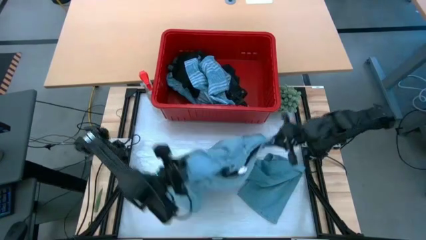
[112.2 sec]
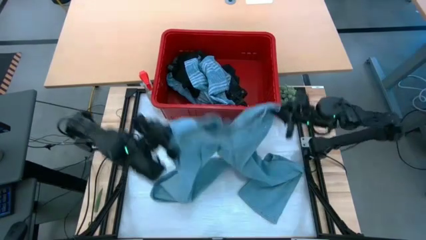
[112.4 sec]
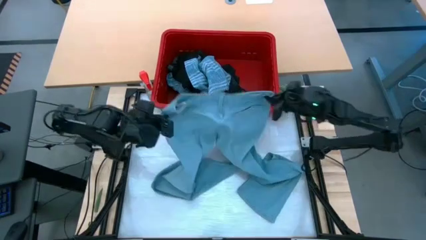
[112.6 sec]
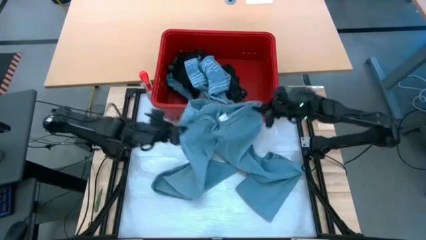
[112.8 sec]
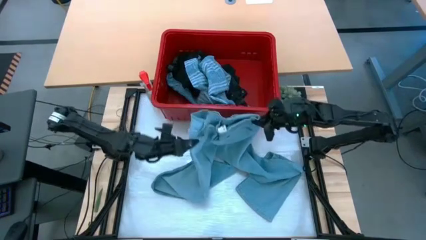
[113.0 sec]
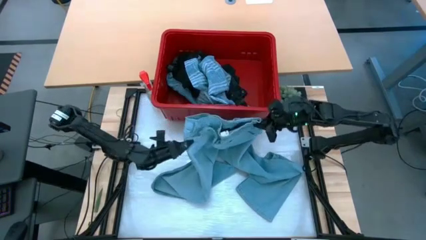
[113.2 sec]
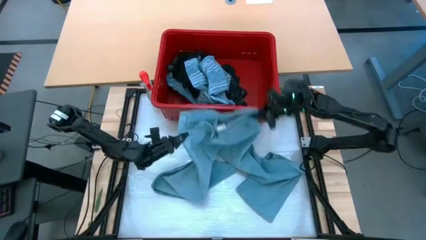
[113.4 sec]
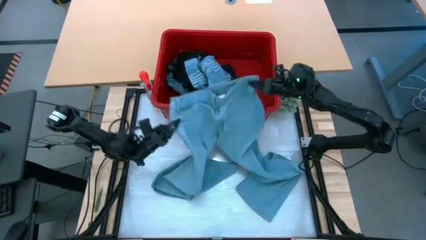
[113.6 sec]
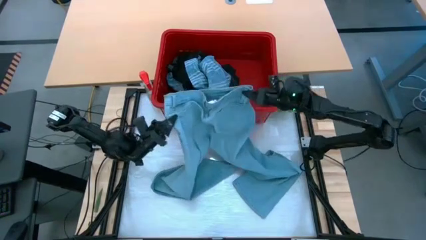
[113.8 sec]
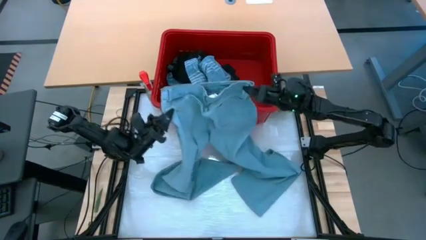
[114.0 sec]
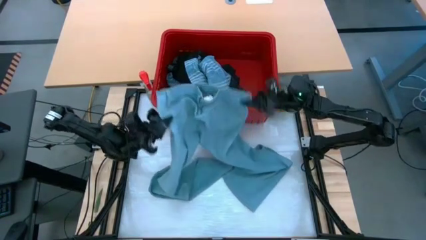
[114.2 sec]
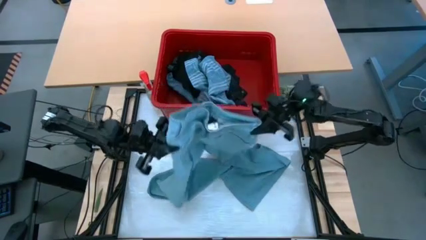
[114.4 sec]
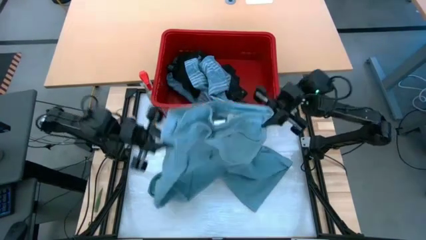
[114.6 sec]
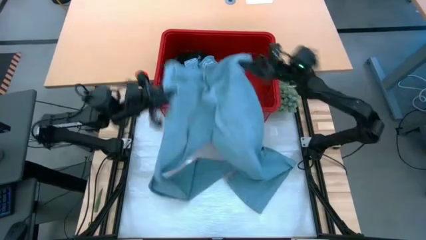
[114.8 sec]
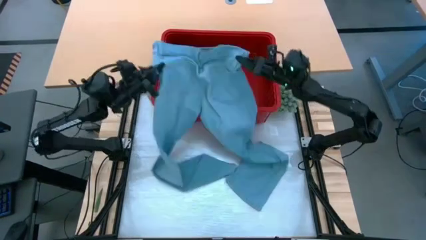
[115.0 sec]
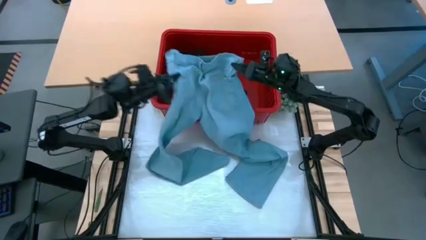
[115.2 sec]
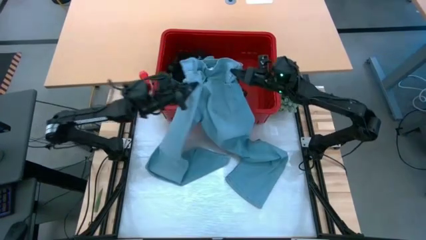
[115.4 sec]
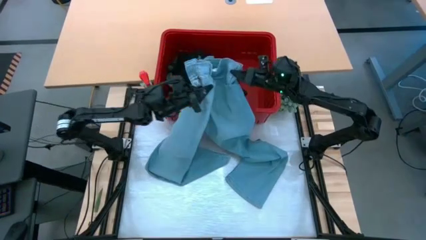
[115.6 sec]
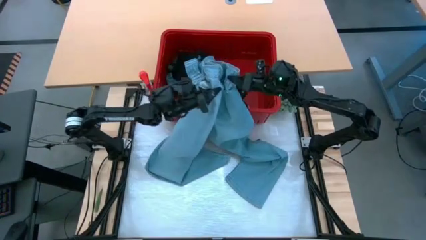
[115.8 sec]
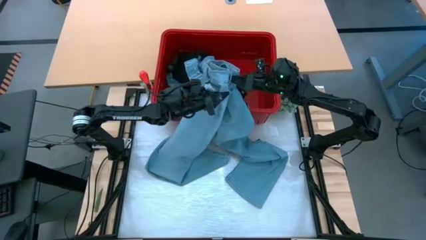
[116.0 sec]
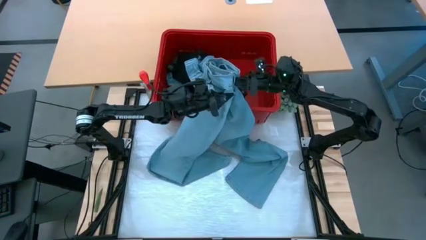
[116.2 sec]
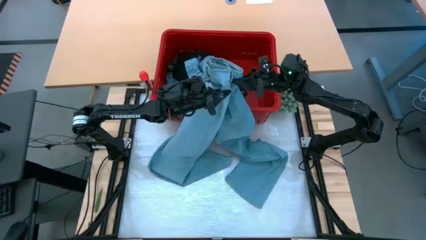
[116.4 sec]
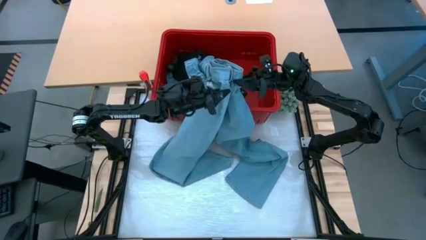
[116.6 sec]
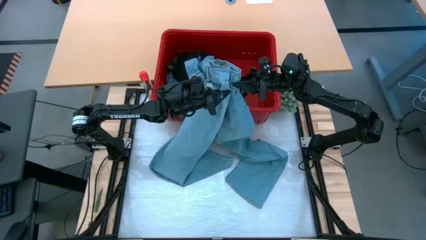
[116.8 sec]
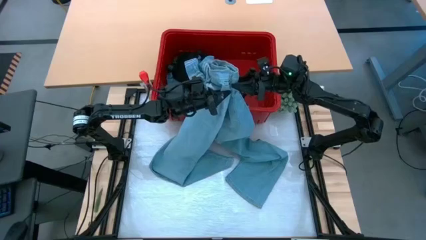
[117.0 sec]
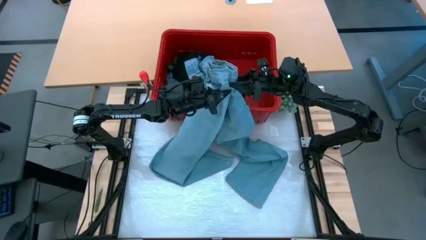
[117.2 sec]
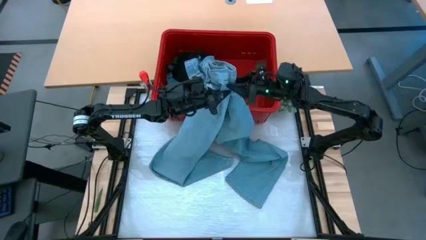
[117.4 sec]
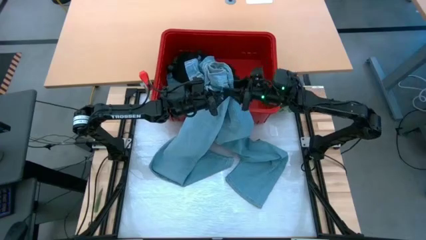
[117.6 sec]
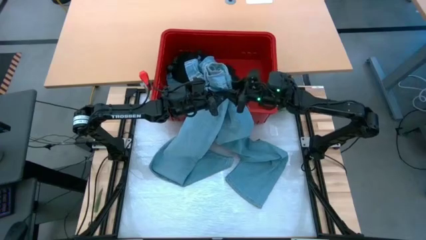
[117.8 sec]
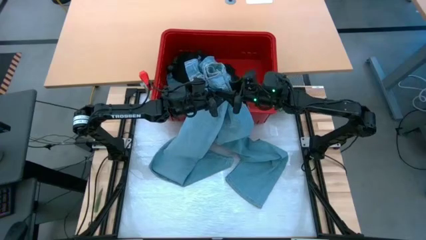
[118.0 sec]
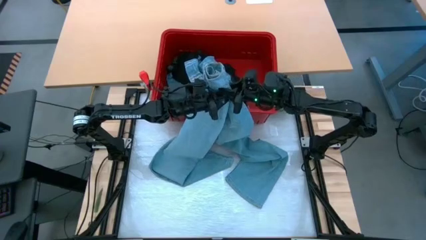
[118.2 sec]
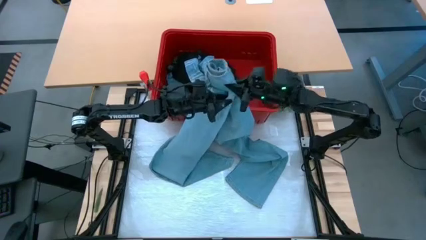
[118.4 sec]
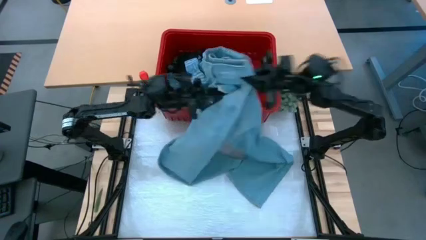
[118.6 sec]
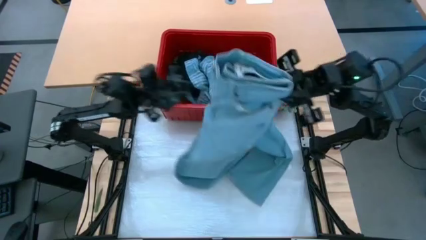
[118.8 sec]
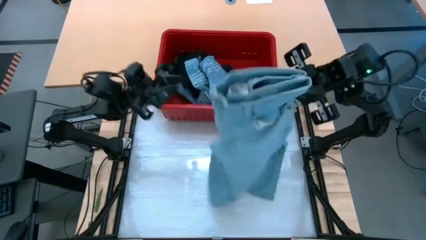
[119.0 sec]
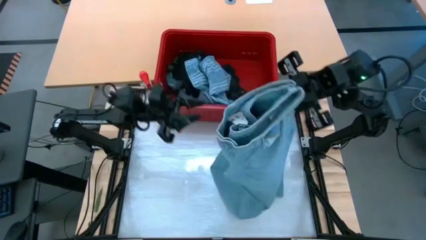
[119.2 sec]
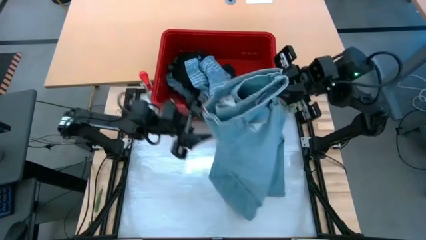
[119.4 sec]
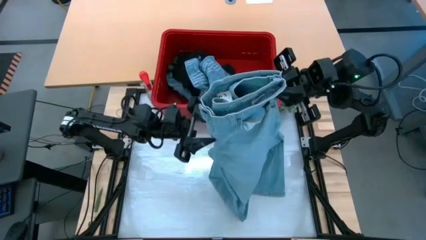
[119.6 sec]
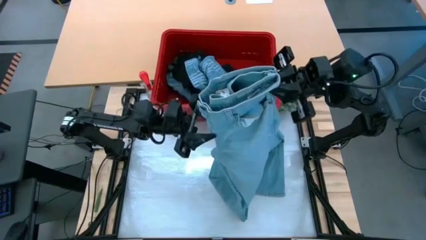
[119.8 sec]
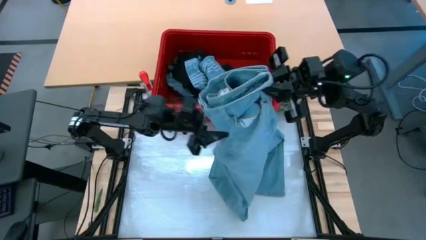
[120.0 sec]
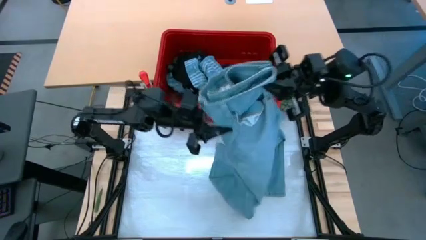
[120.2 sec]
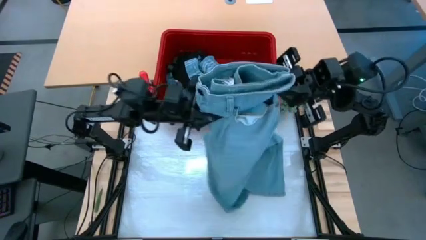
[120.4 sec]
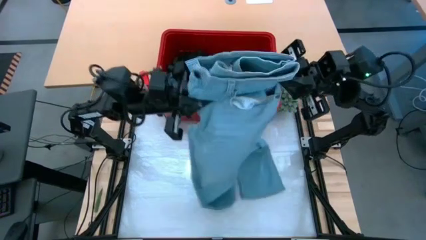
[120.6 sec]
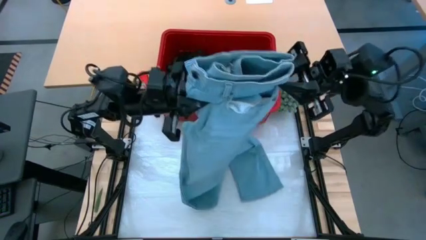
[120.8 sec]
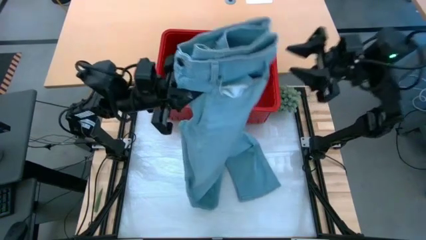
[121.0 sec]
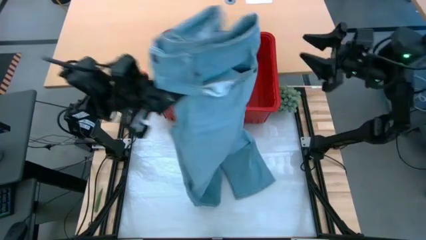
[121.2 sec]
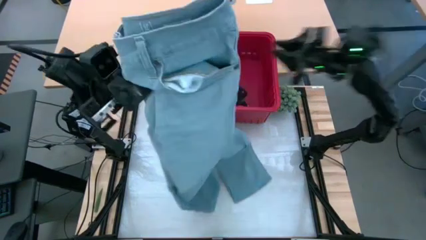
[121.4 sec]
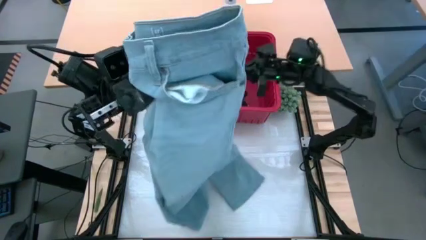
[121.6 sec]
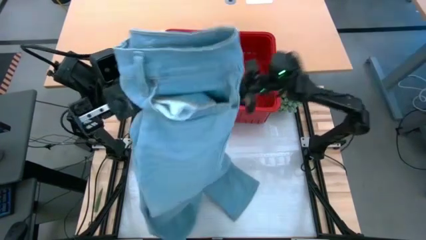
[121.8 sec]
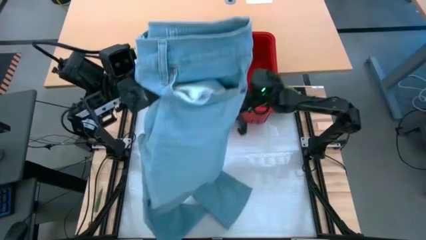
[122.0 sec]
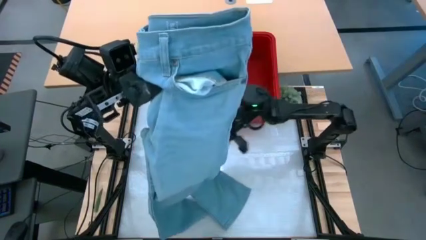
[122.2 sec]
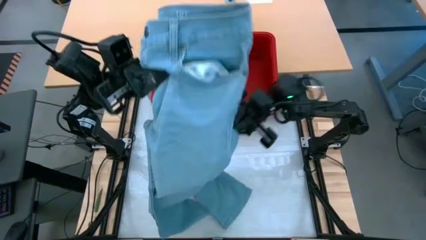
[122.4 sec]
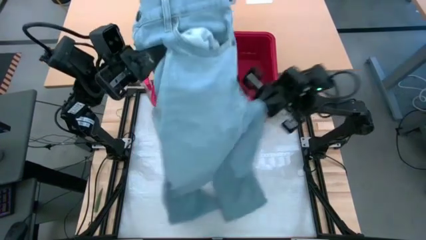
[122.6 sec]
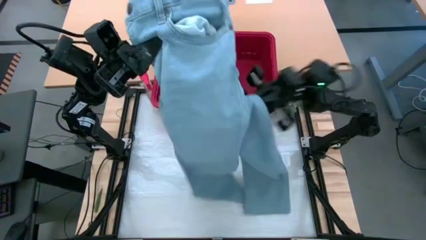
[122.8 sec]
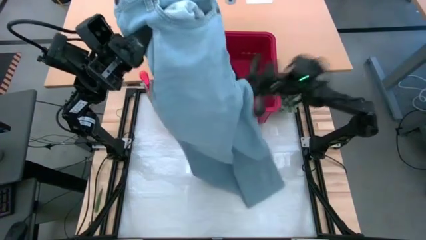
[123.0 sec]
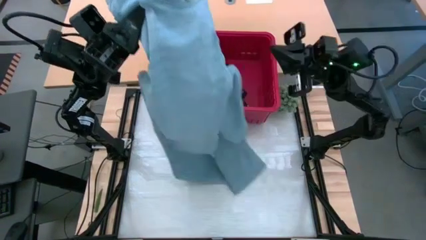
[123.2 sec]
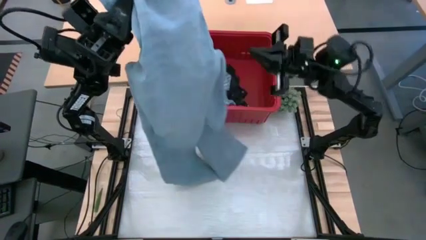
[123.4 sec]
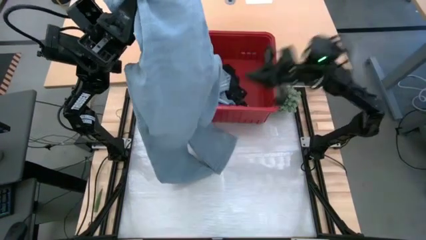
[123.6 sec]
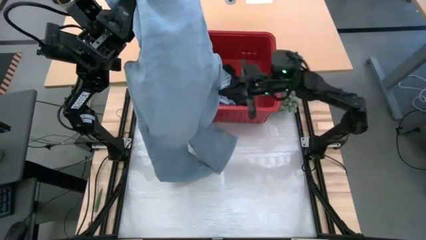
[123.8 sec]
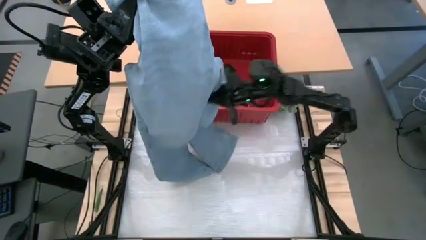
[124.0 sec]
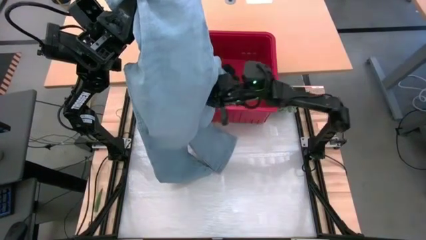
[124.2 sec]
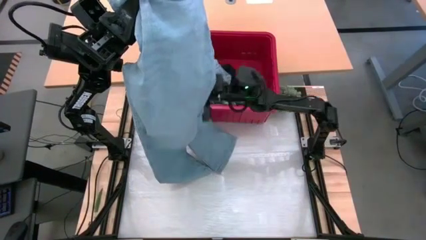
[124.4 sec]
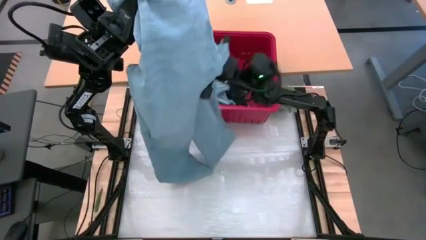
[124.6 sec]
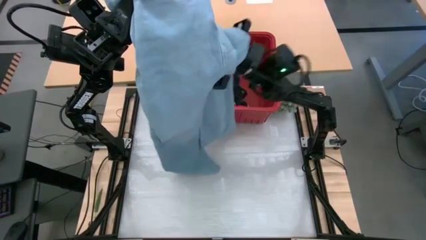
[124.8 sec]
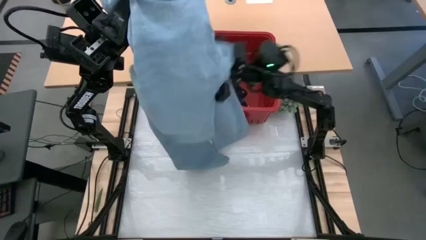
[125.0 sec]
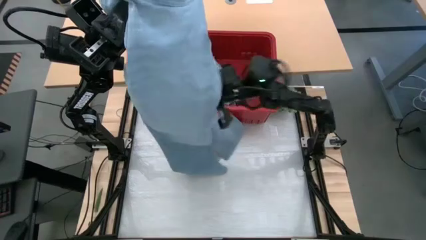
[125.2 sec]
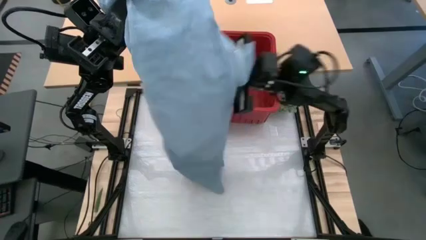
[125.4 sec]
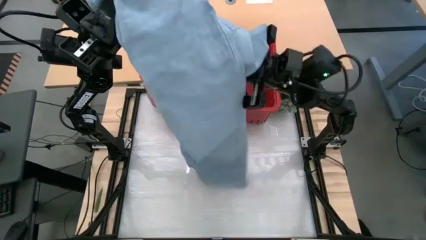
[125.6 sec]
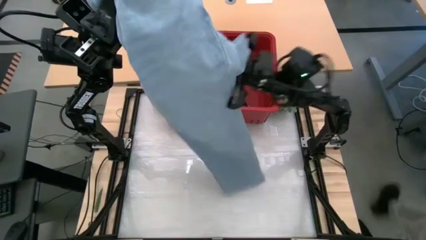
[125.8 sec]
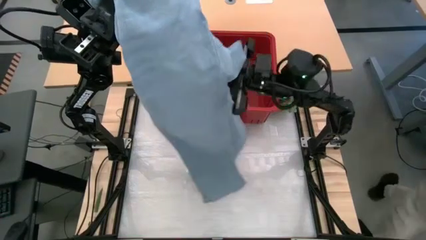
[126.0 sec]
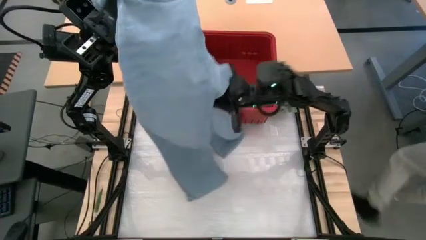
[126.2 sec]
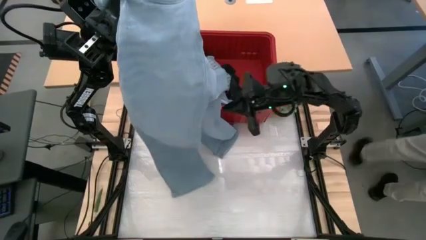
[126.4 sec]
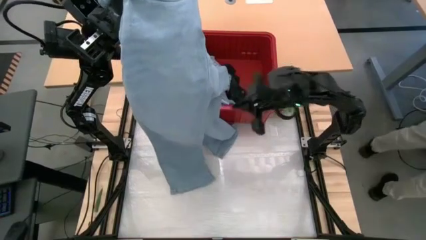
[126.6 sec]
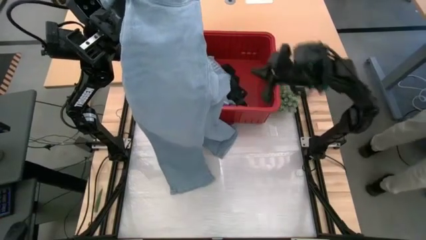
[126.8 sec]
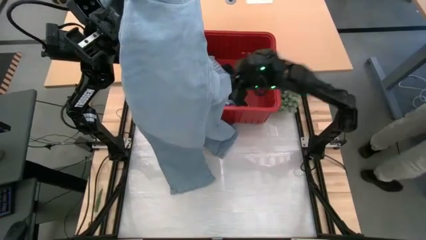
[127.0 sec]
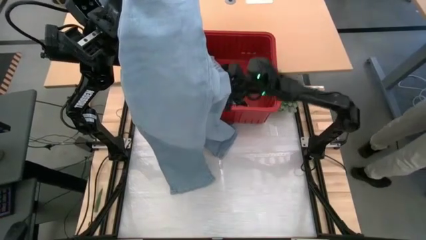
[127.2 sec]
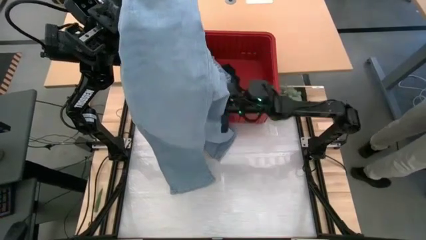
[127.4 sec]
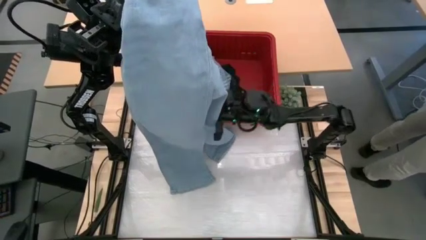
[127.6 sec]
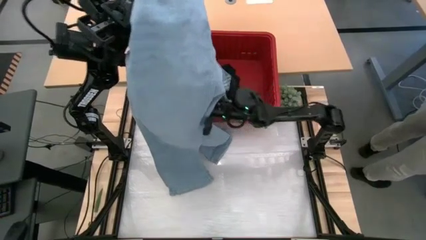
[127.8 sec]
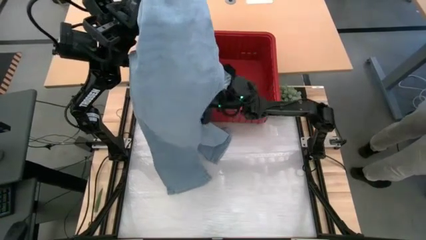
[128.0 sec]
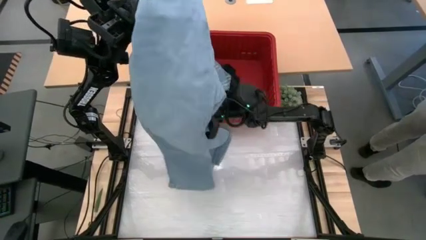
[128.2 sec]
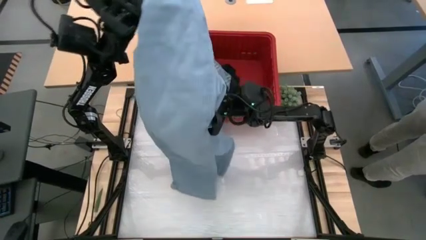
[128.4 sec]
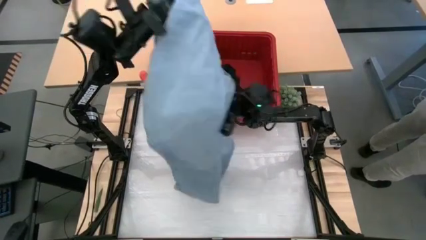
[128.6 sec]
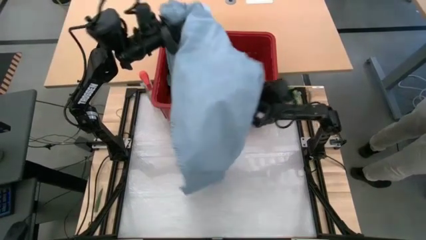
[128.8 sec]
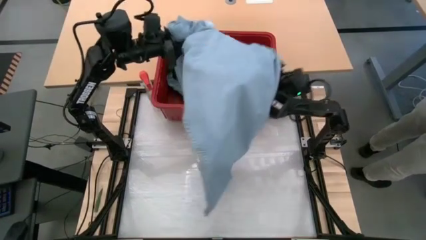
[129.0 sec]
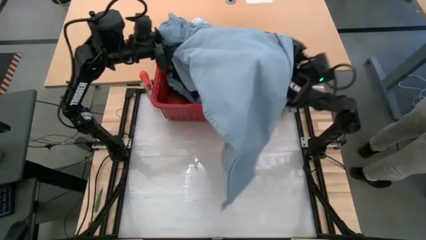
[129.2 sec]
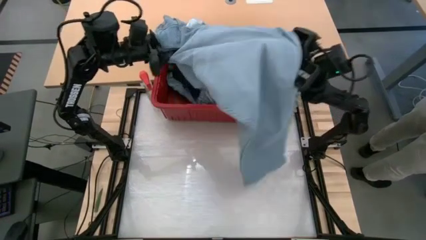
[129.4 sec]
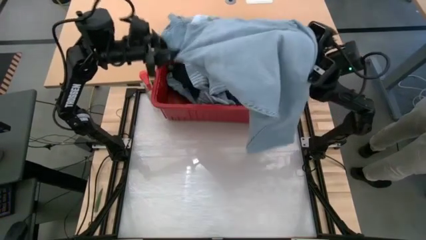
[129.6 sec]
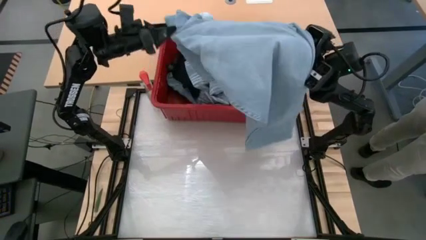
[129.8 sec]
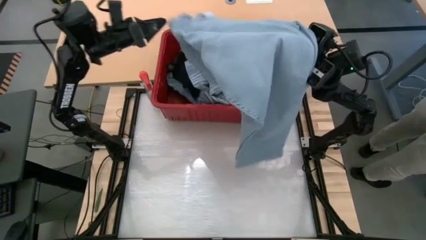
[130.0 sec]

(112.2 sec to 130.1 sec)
Task: Fold Laundry from Bin
Fold the light blue pants
